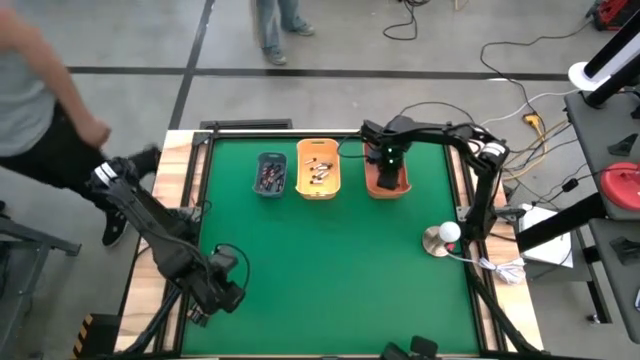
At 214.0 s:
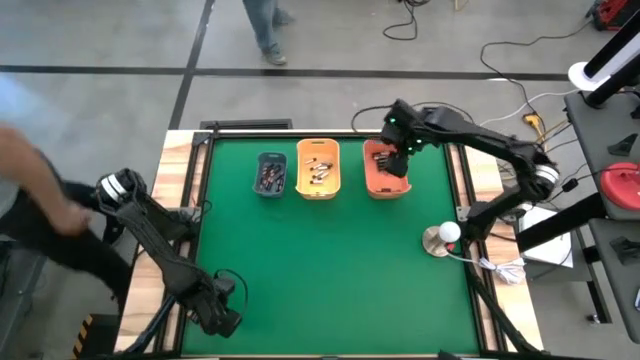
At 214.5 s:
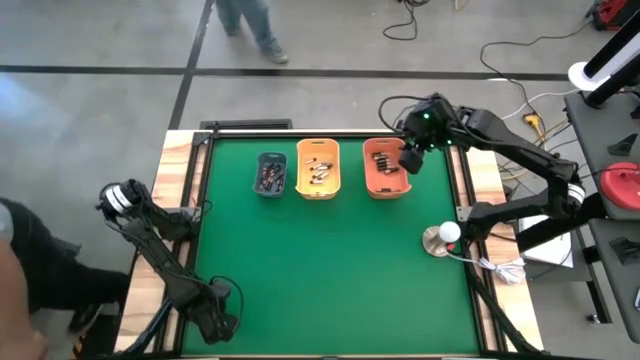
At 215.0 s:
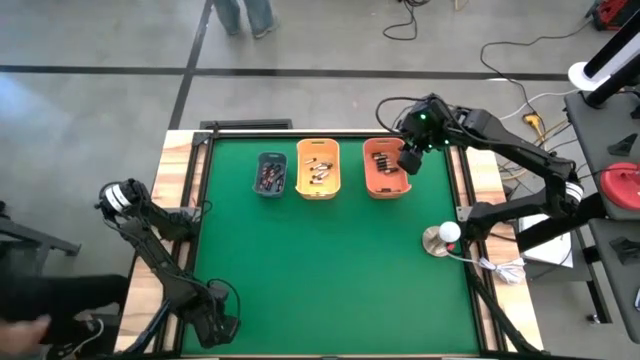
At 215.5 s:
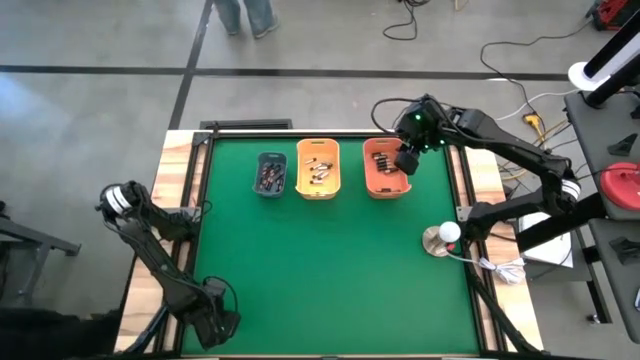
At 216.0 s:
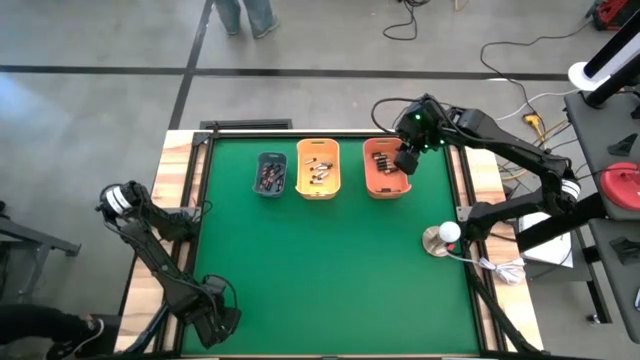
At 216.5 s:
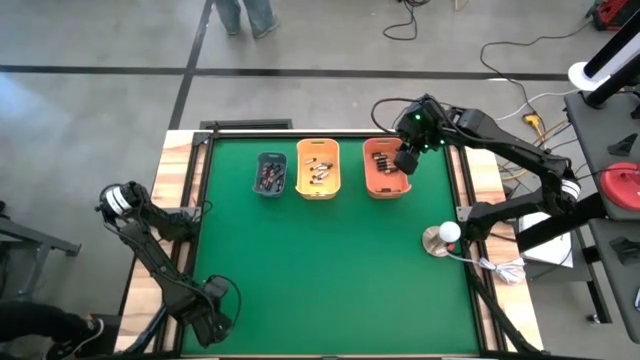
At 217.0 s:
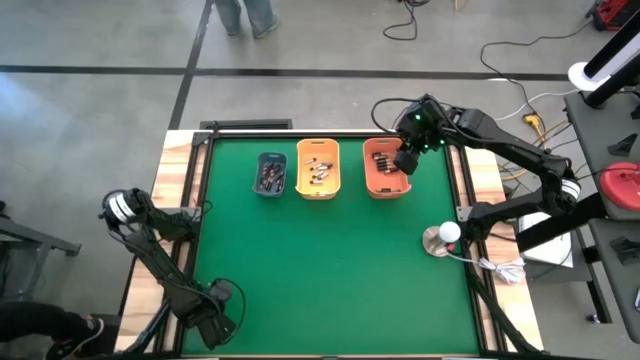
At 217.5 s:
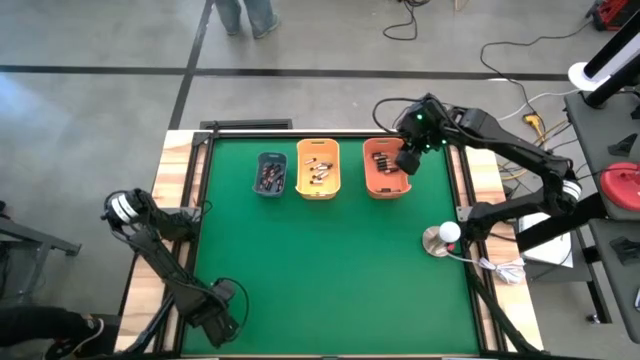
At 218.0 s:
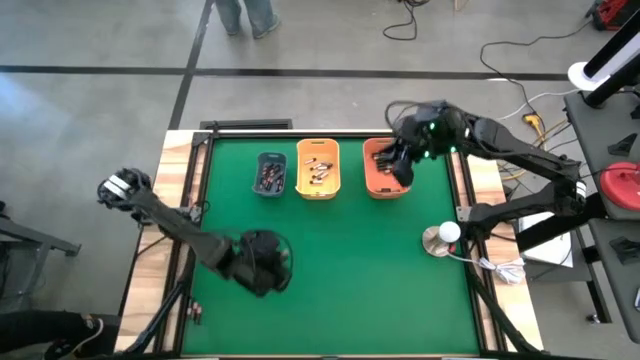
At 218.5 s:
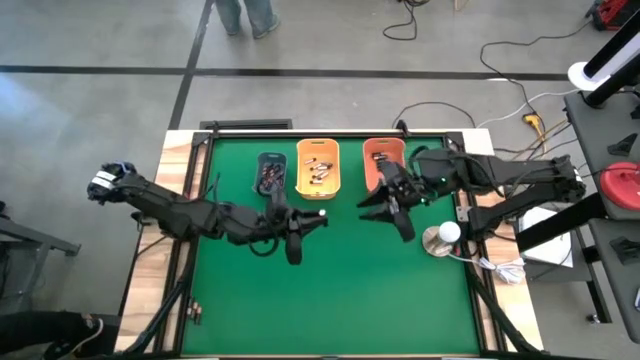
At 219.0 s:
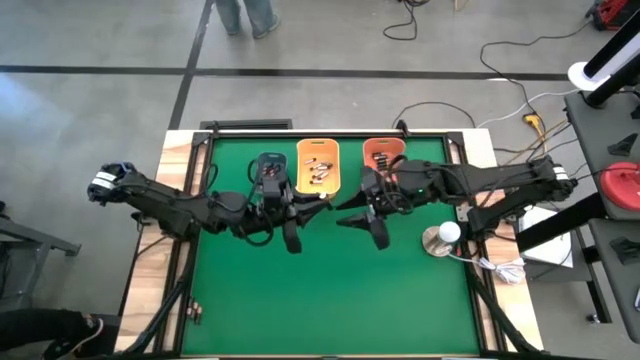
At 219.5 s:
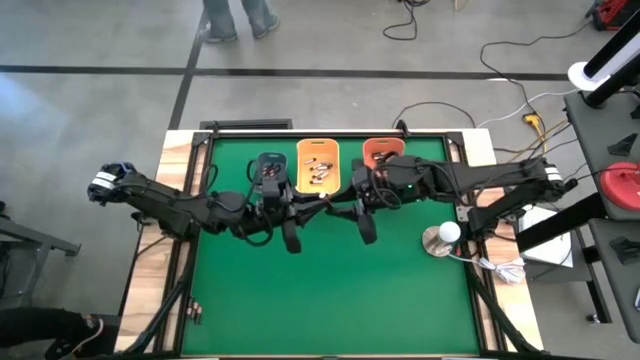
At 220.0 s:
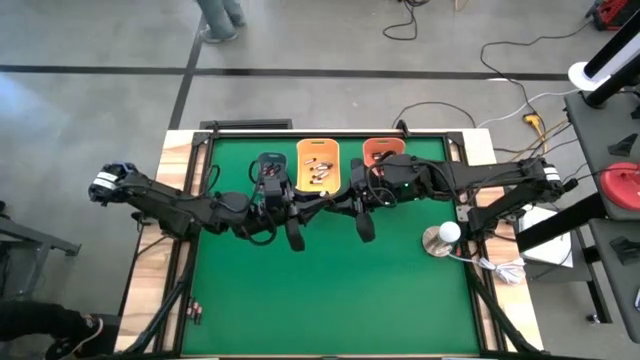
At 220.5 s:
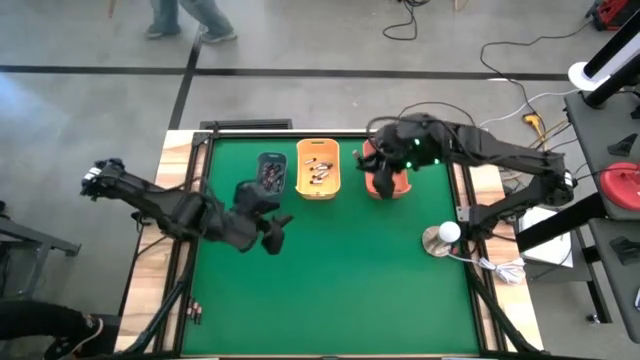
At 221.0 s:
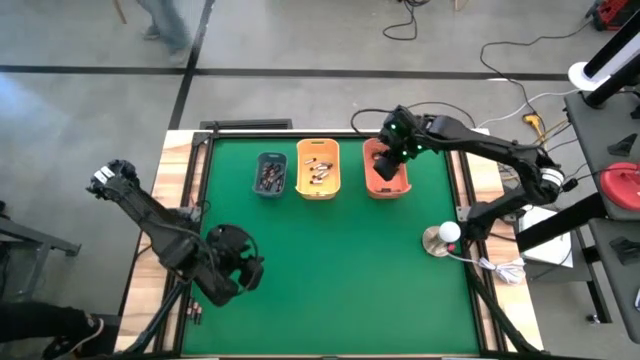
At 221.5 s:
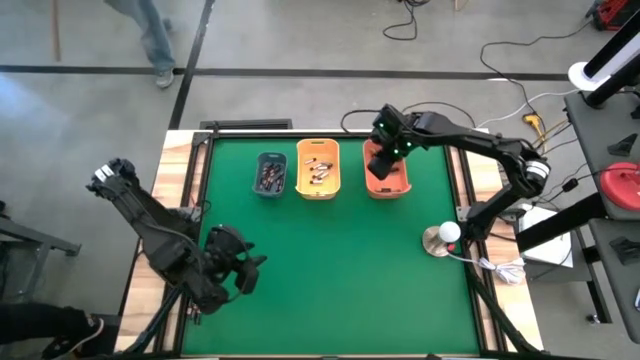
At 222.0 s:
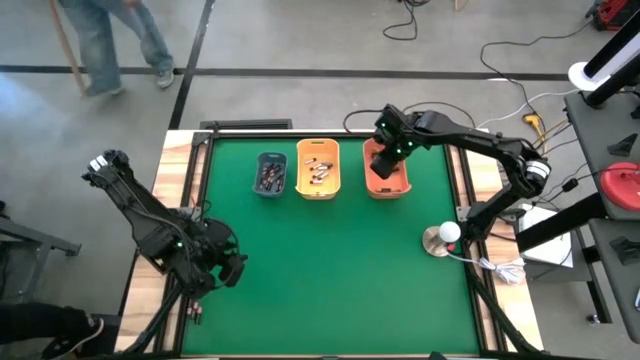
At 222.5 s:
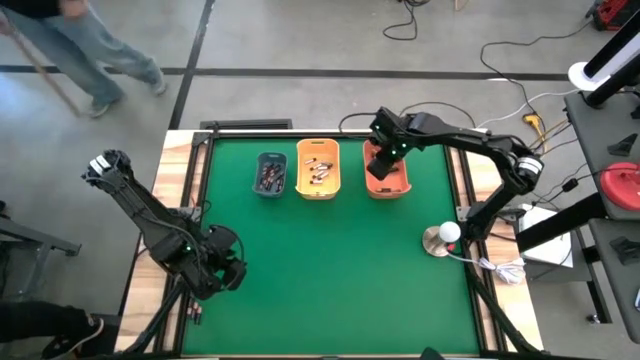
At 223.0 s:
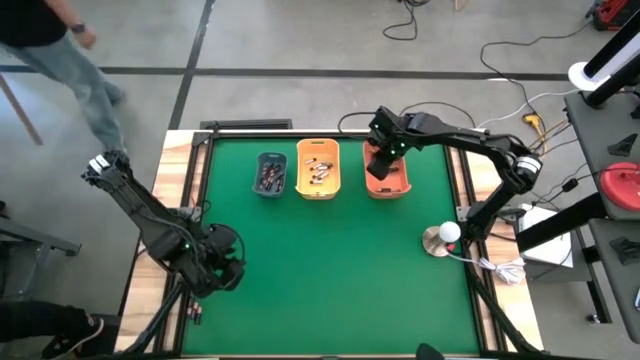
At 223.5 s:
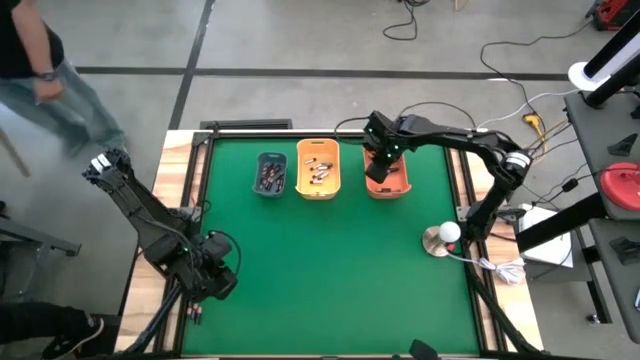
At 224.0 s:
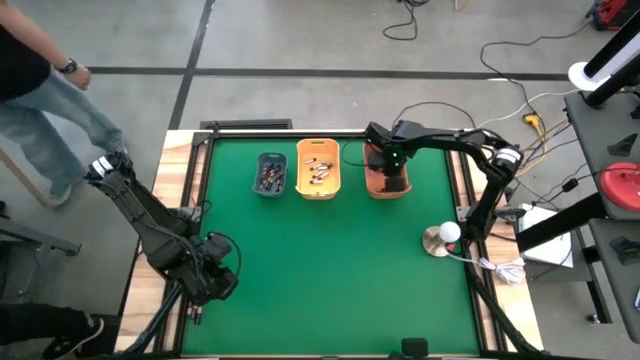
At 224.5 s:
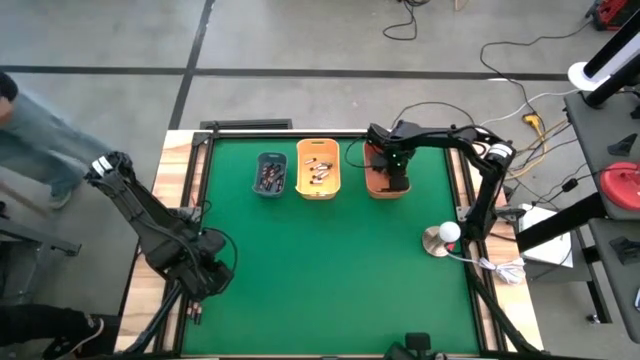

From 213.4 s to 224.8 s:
Task: Sort batteries
Put the black battery into the orange bin

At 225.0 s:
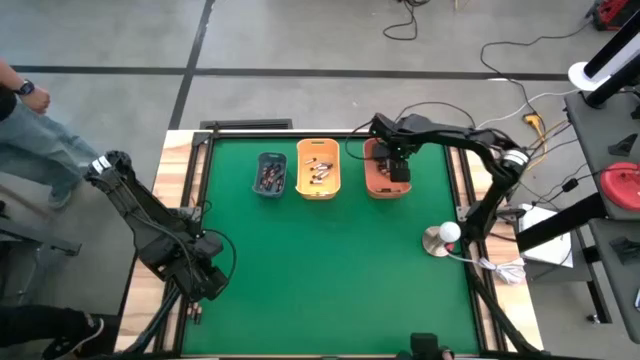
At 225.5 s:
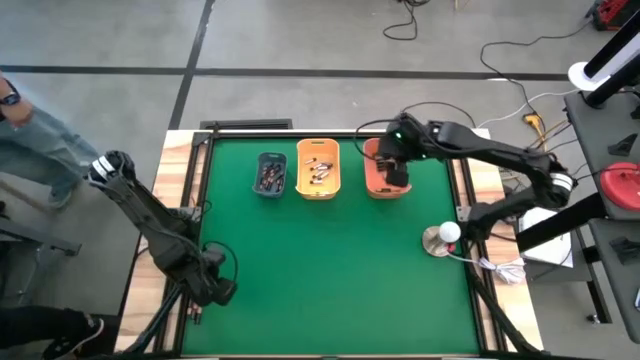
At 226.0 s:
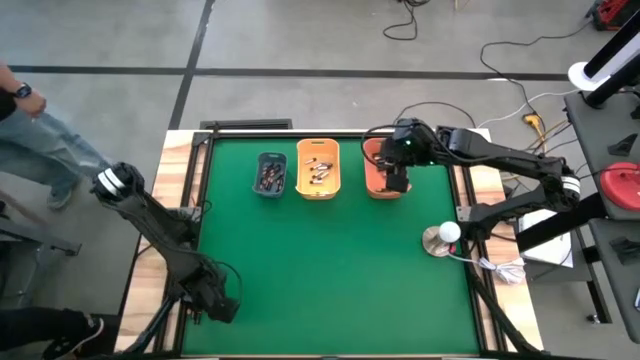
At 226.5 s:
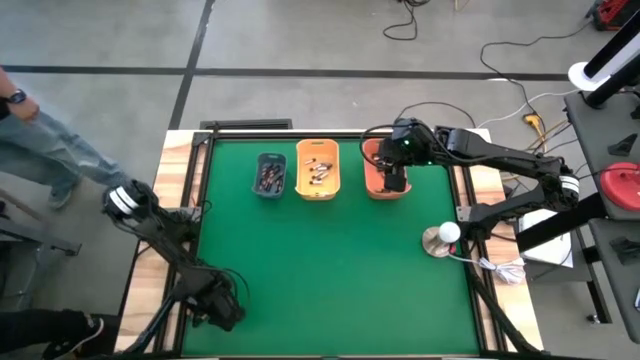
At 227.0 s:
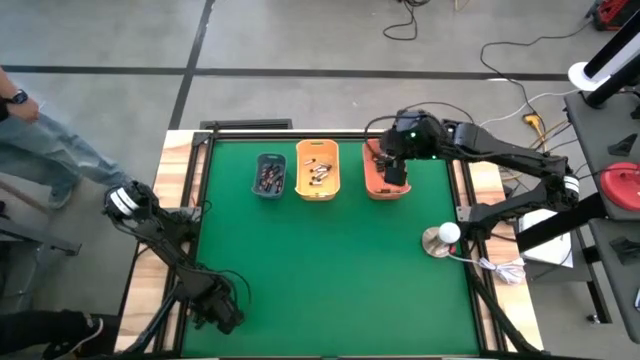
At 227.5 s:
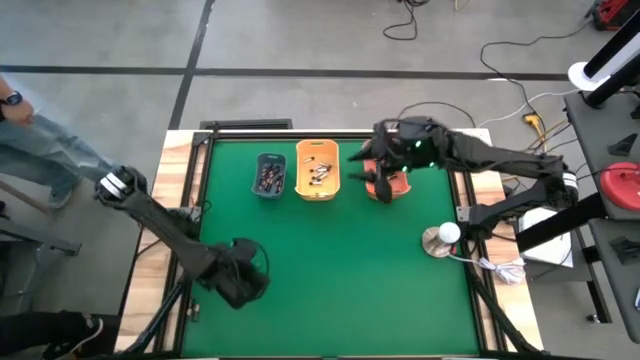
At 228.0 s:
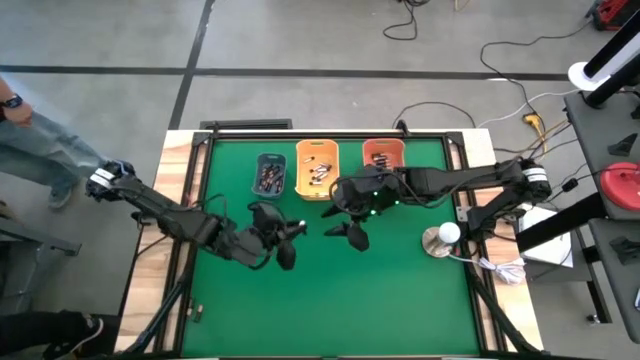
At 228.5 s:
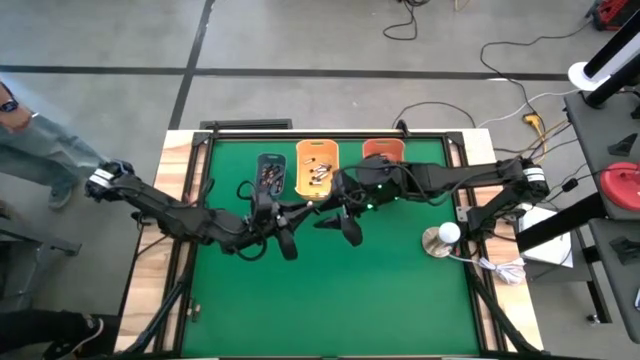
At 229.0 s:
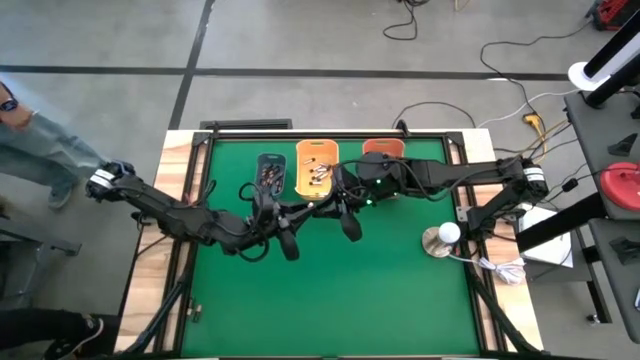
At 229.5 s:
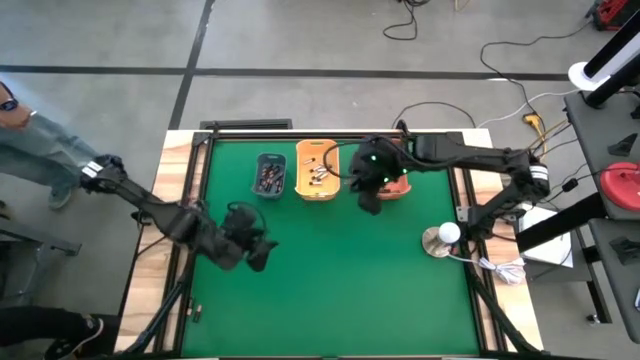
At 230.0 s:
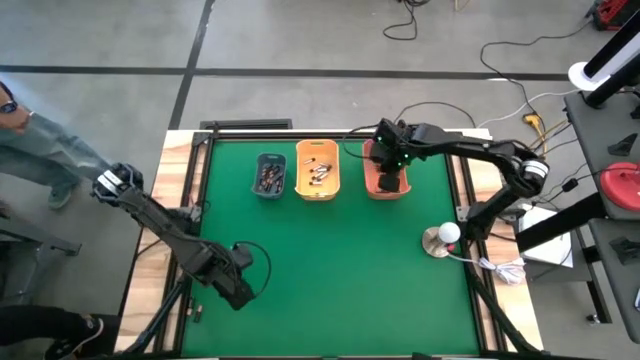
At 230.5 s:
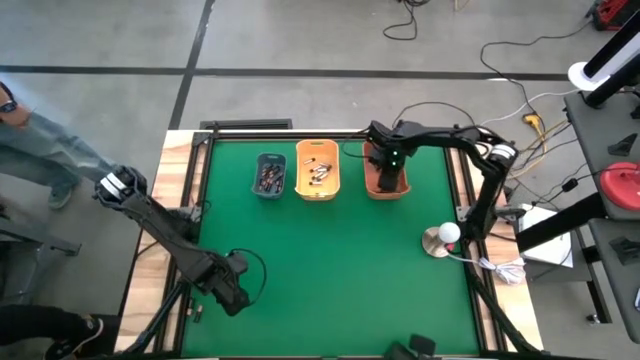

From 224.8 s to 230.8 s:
Put the black battery into the orange bin

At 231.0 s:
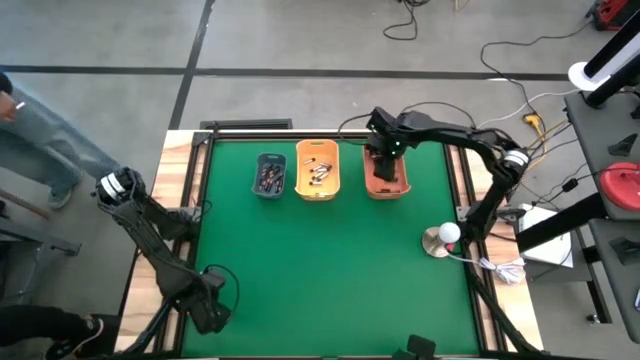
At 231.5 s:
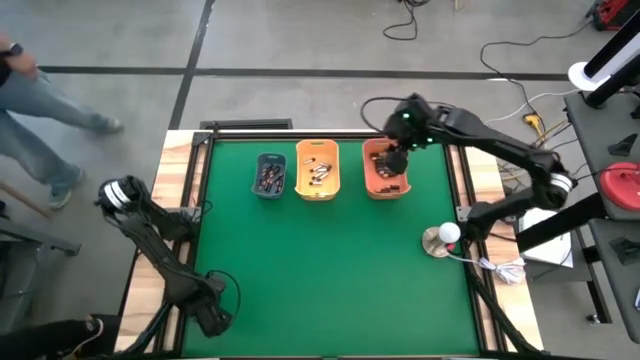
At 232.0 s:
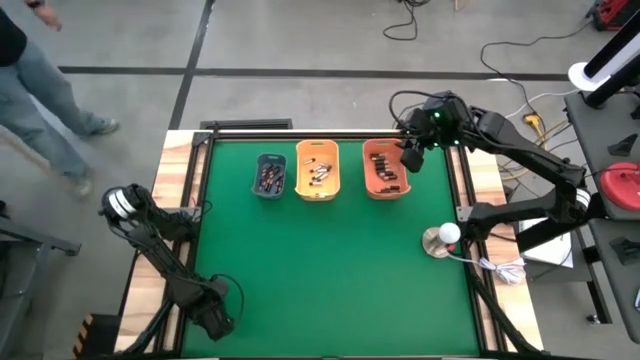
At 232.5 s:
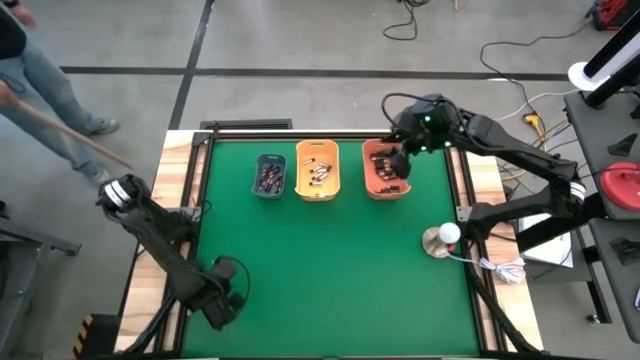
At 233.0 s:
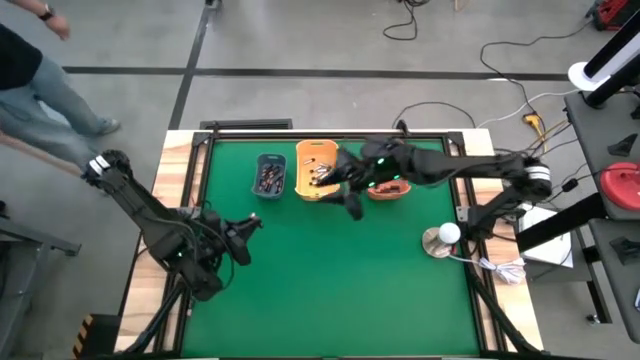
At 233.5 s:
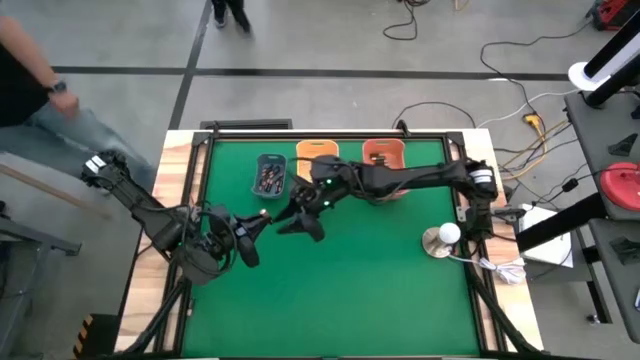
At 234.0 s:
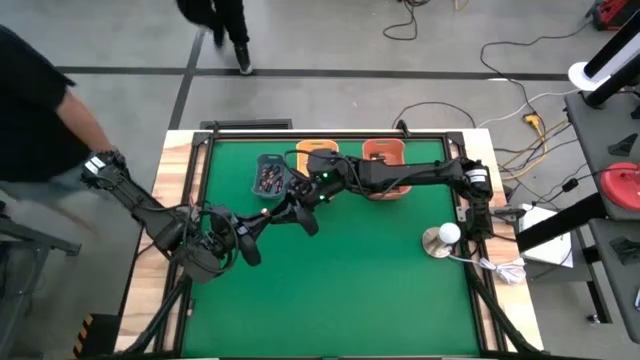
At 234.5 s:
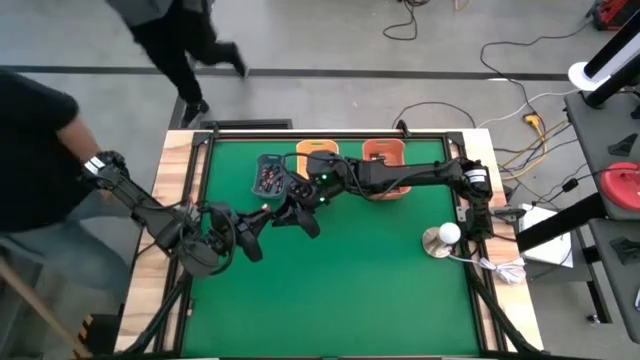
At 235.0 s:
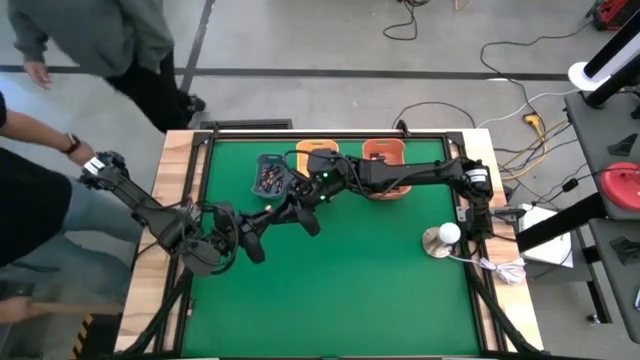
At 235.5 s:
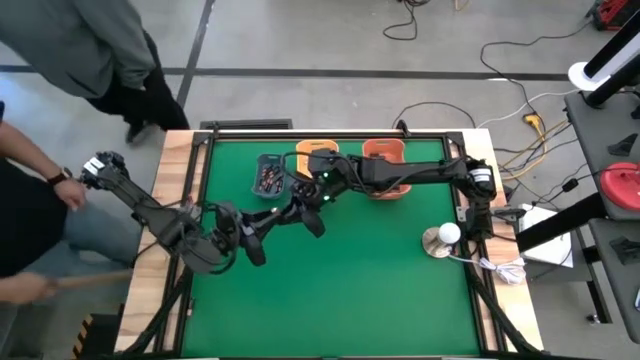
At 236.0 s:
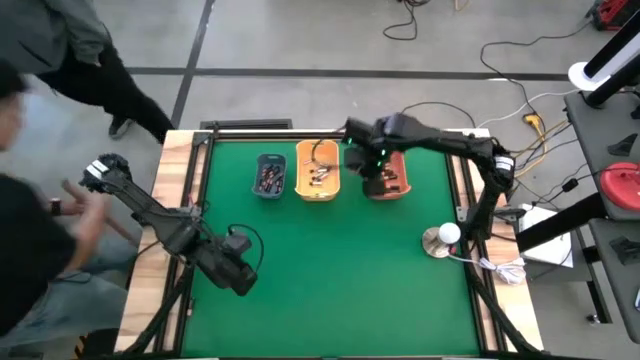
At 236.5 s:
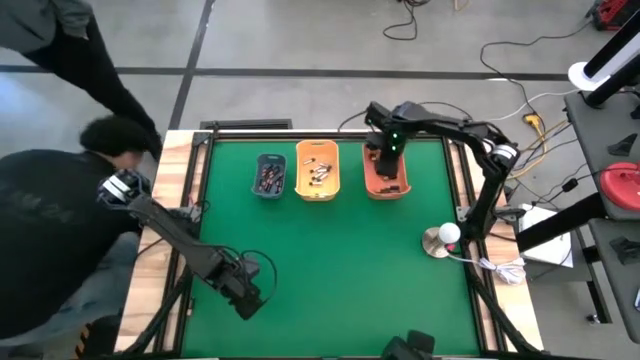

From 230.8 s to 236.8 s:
Put the gold/black battery into the orange bin
